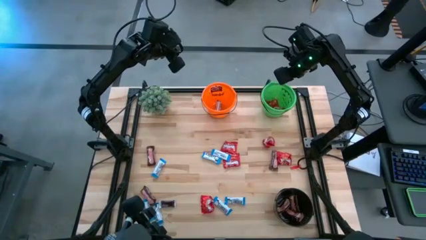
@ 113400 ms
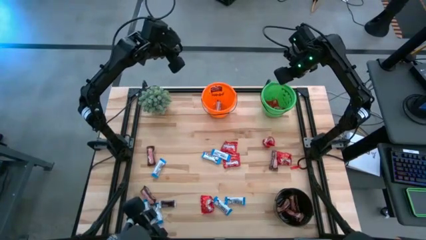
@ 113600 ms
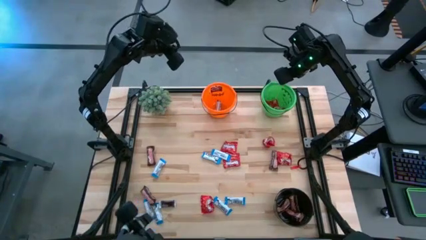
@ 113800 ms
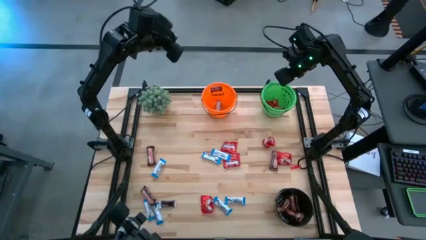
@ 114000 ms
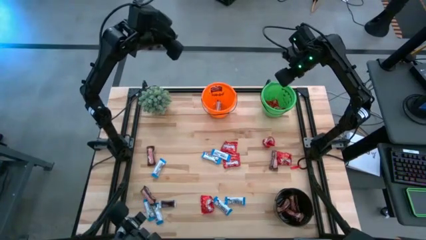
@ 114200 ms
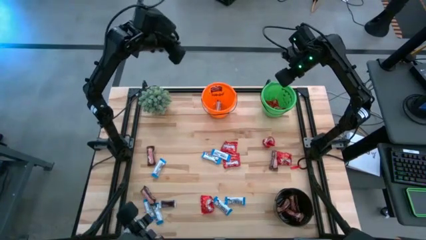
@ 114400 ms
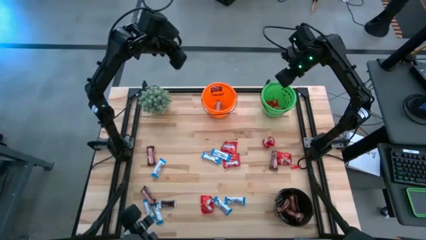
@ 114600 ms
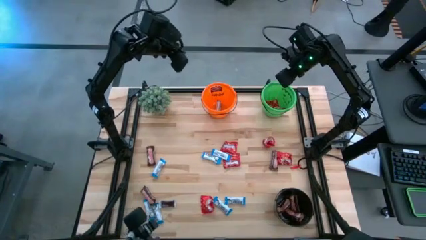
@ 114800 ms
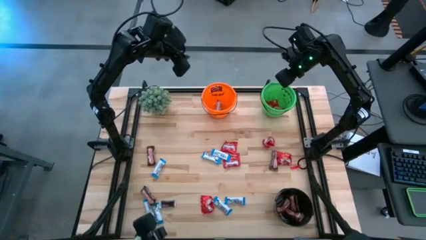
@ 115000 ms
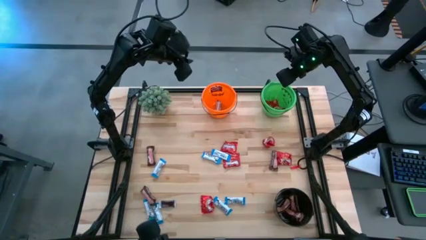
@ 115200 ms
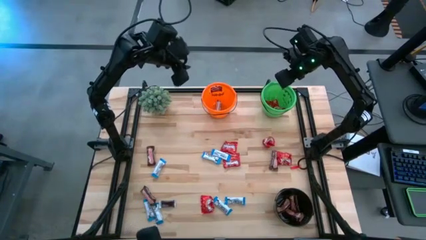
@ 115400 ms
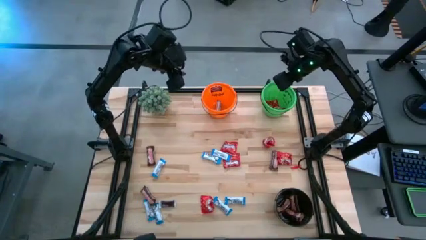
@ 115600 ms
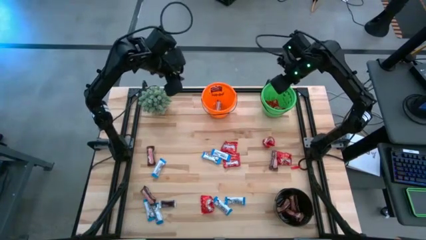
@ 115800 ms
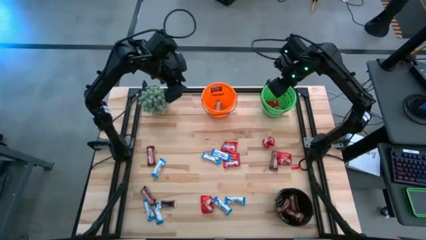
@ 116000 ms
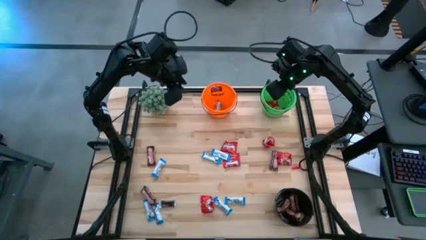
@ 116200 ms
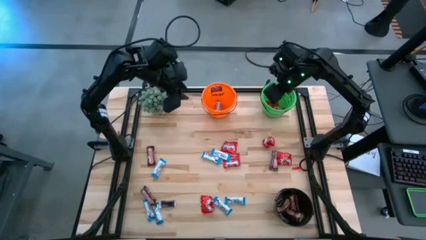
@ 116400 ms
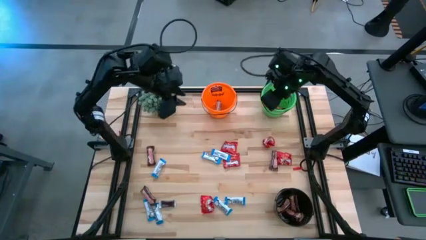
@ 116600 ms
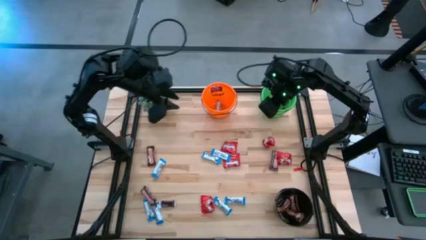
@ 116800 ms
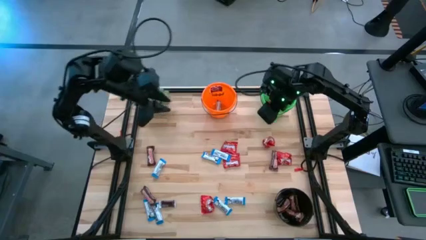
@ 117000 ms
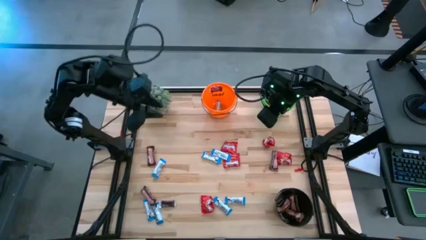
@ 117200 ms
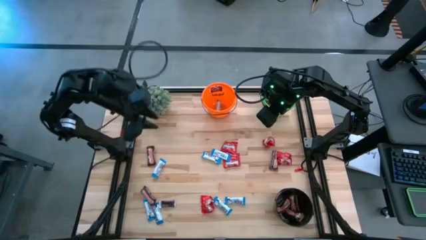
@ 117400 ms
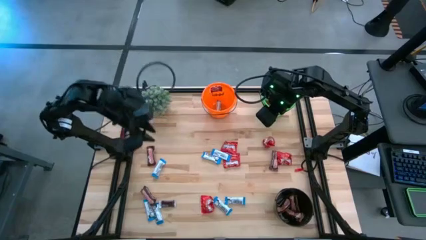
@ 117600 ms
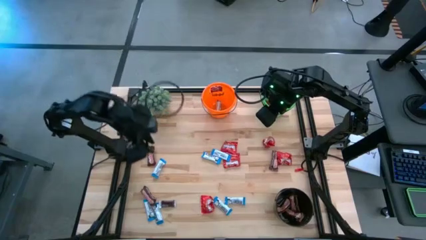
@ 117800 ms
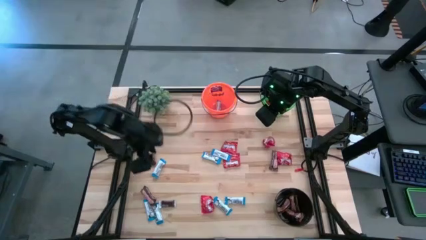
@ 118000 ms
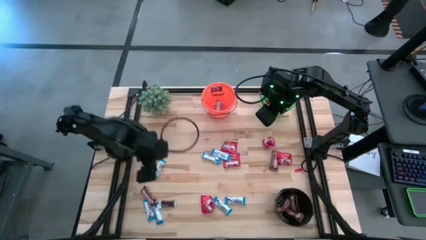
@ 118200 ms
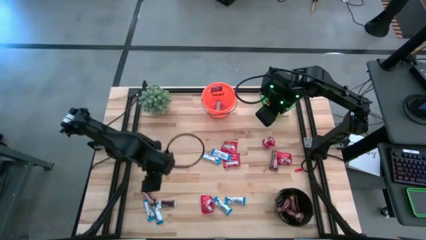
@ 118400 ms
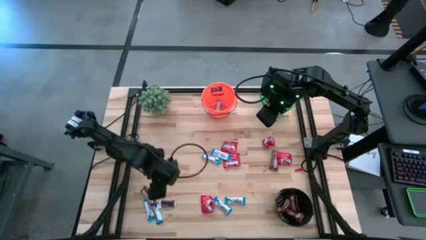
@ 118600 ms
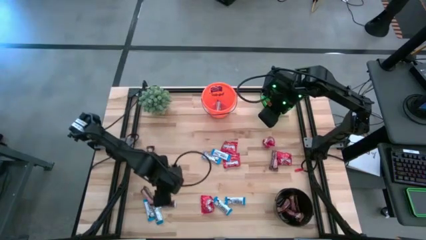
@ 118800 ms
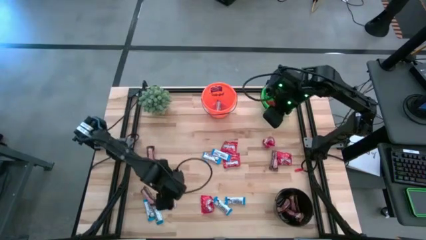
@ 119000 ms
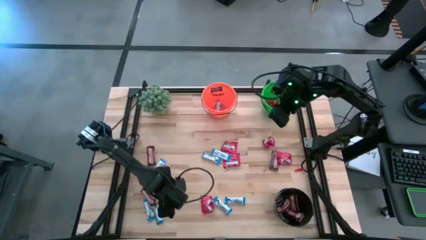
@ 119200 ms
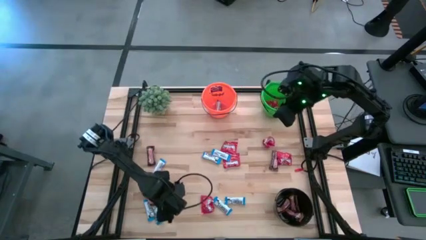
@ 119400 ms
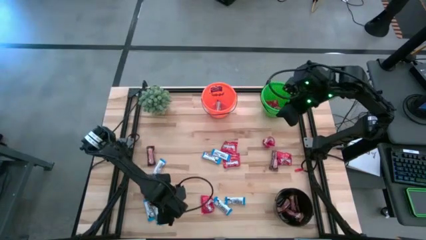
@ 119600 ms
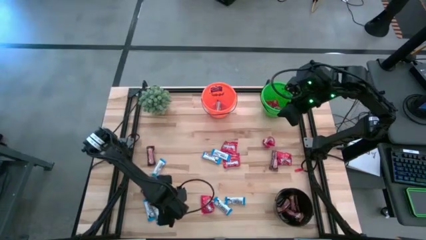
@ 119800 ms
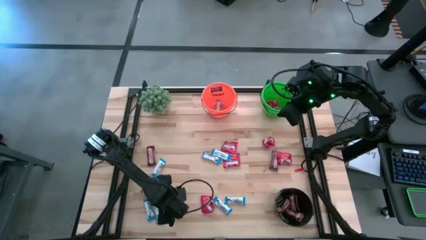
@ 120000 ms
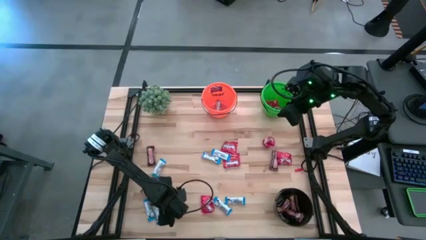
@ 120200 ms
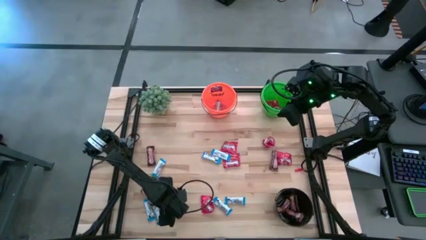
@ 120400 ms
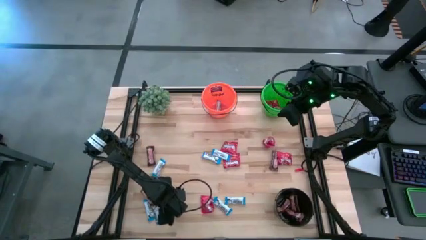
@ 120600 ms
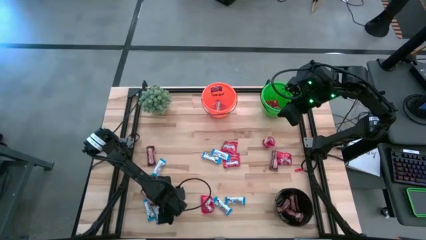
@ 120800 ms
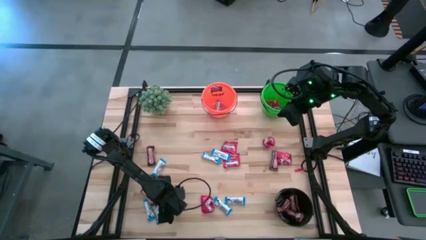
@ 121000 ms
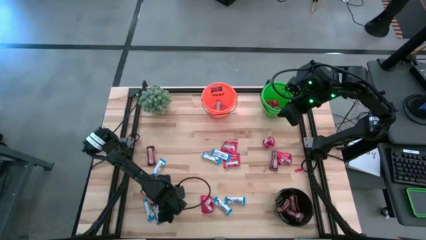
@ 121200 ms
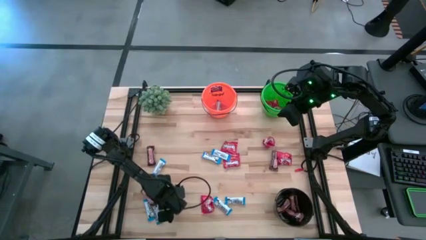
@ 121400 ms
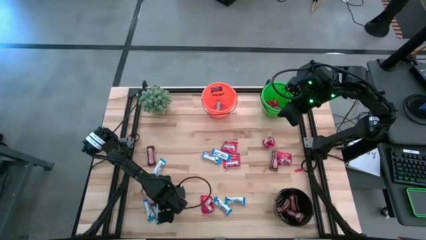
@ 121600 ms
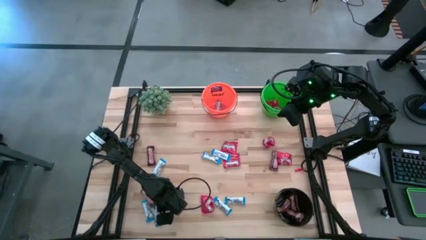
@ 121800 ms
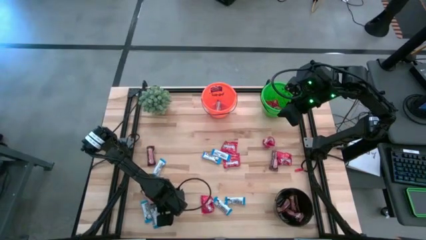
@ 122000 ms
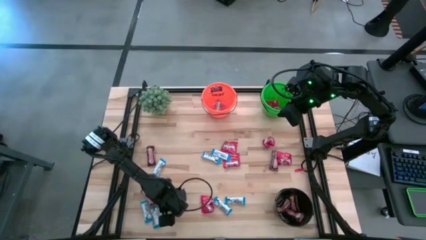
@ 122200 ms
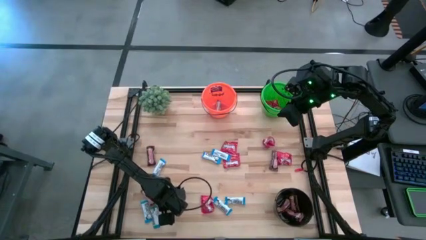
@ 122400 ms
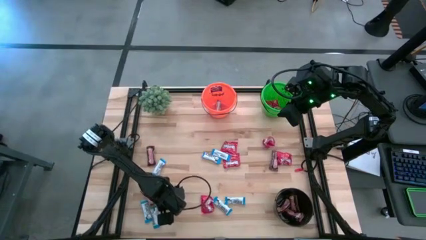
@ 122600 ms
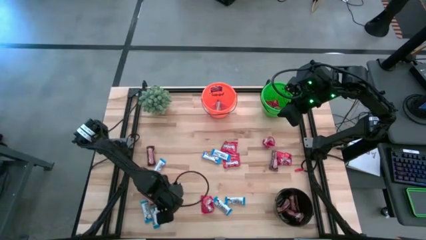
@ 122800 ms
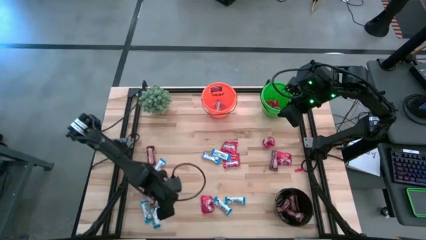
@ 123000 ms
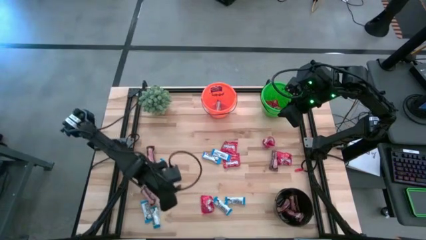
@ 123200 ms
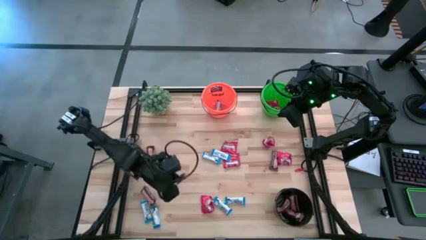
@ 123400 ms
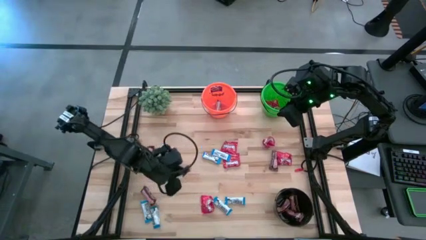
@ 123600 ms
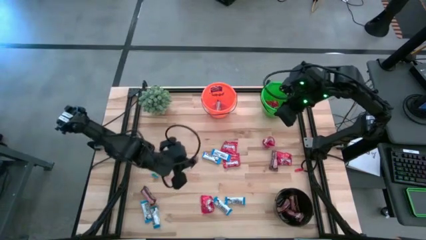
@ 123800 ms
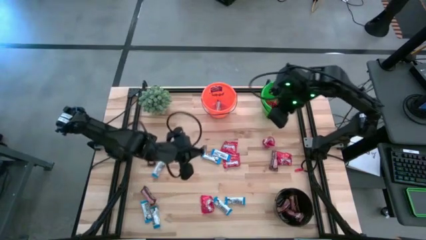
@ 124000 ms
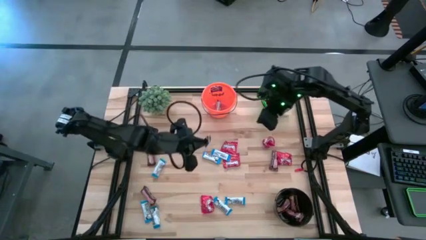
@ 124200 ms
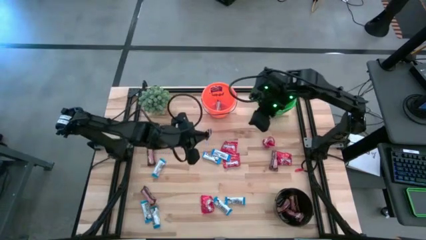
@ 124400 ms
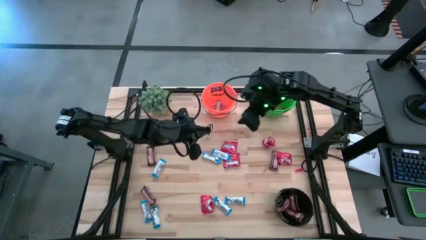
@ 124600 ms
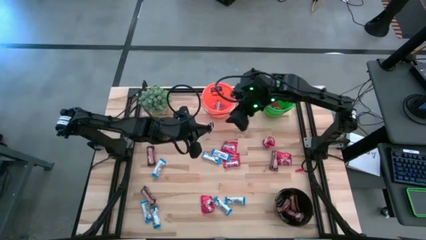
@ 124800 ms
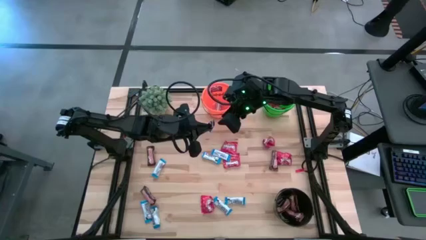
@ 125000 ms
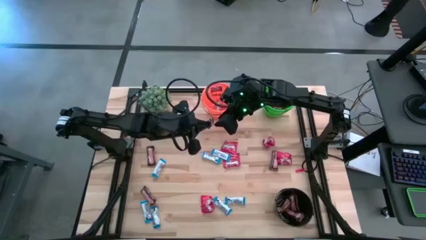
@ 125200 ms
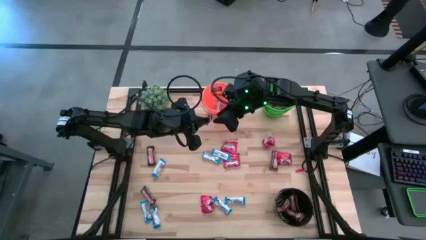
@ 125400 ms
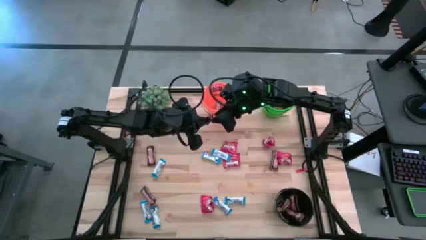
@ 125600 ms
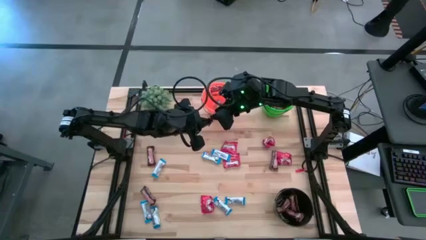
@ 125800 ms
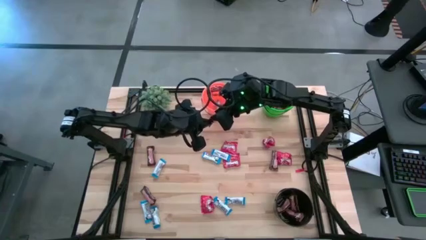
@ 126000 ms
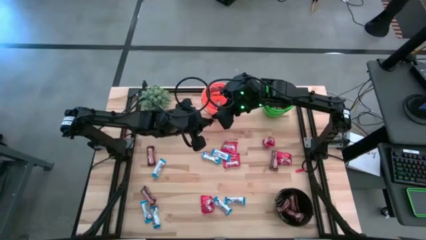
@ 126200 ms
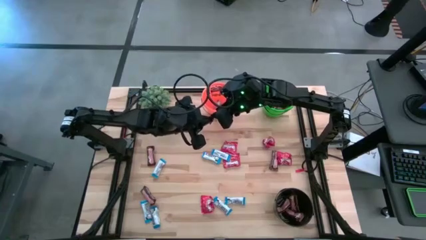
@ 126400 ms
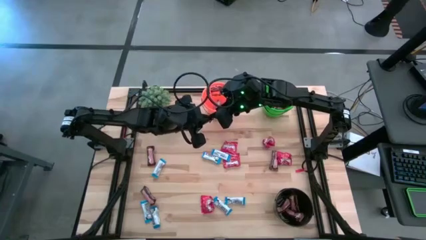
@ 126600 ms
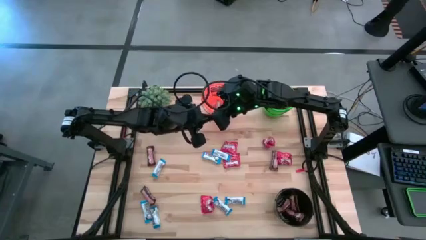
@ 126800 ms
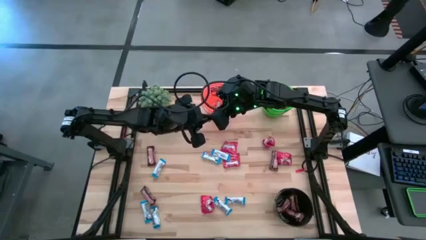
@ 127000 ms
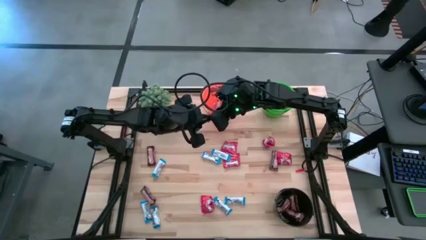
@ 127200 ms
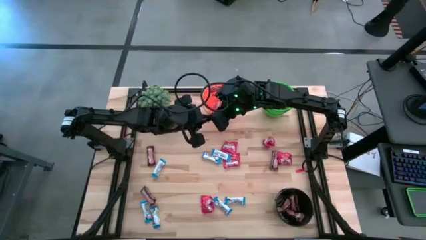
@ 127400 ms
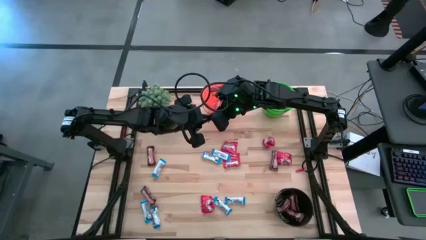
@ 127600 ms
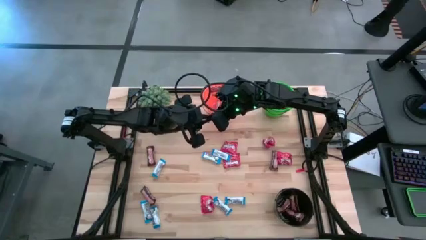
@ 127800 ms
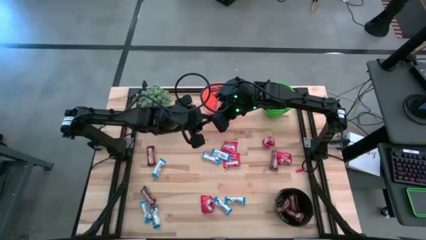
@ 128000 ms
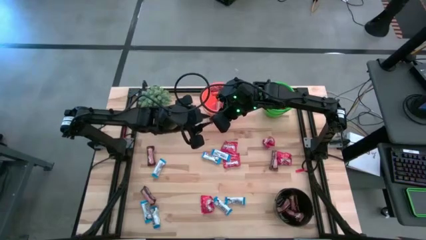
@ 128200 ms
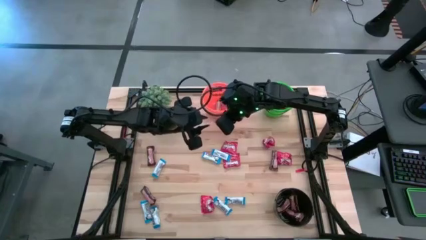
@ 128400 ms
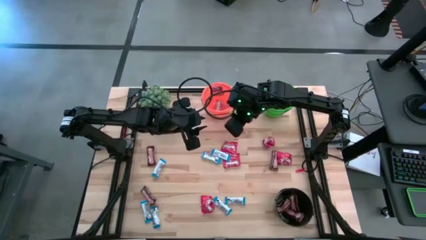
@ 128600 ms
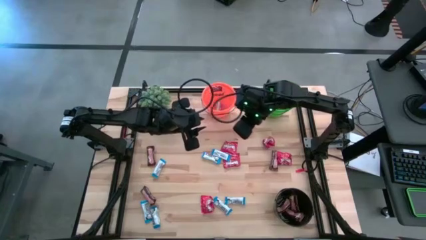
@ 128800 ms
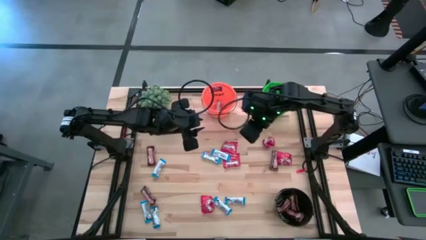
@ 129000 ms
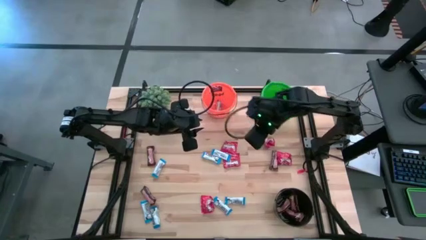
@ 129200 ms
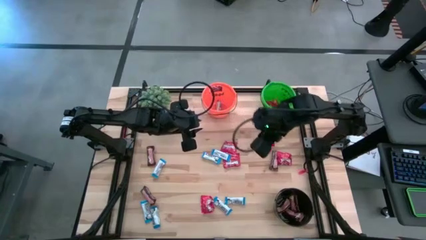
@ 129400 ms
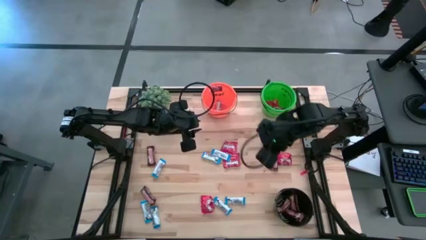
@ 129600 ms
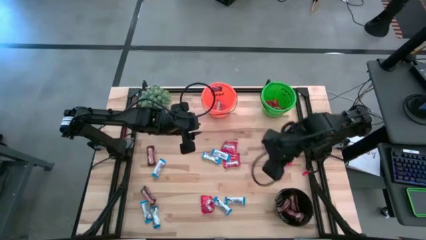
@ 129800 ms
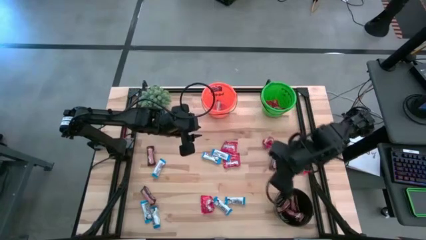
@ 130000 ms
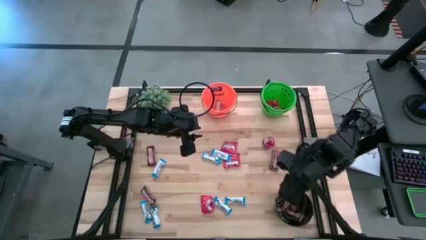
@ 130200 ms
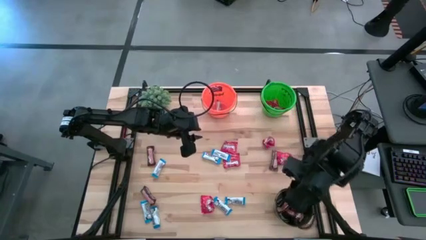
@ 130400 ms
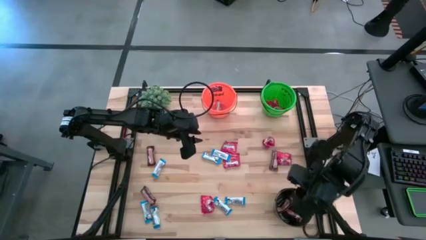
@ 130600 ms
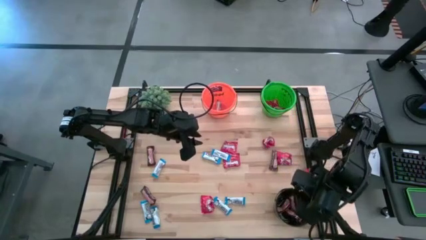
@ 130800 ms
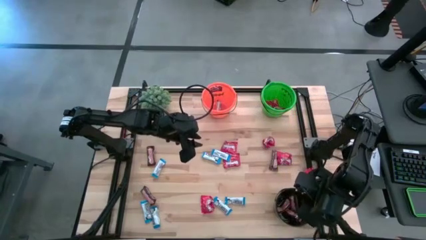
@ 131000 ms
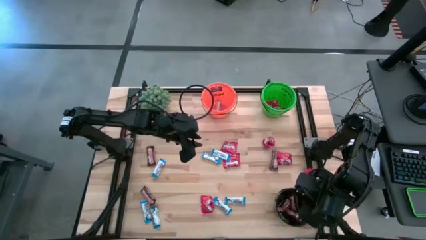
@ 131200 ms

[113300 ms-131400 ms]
Task: Organize candy in baskets
Put the brown chocolate bar into the black bucket
